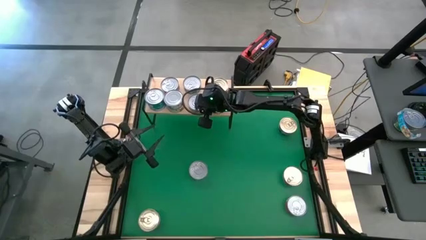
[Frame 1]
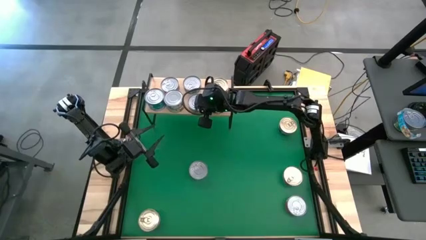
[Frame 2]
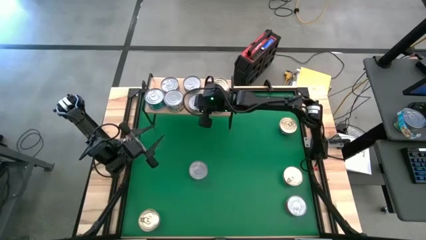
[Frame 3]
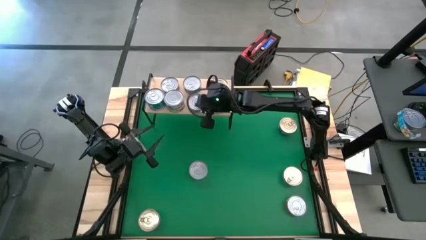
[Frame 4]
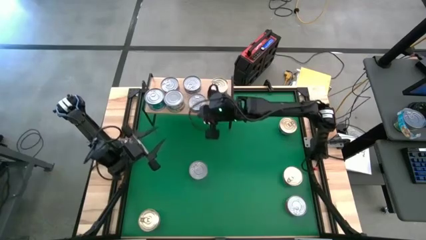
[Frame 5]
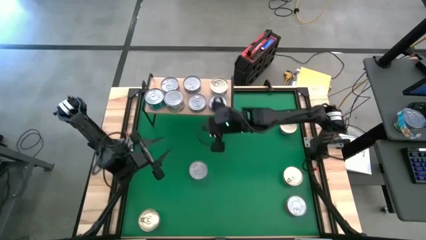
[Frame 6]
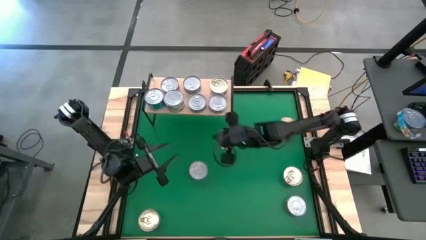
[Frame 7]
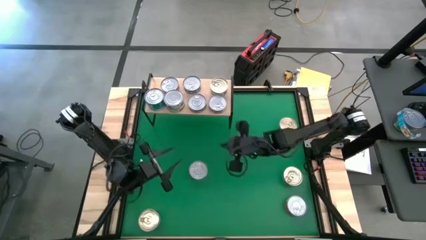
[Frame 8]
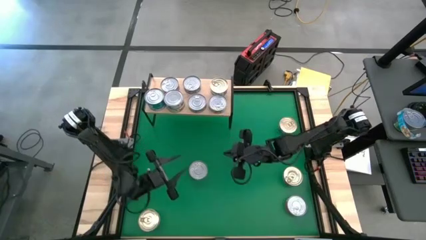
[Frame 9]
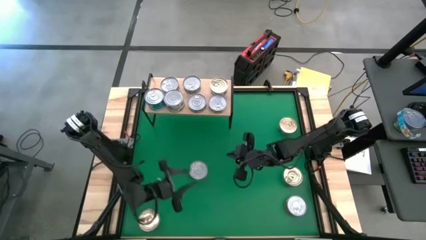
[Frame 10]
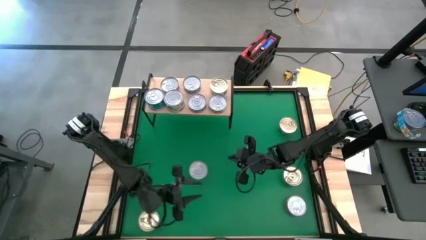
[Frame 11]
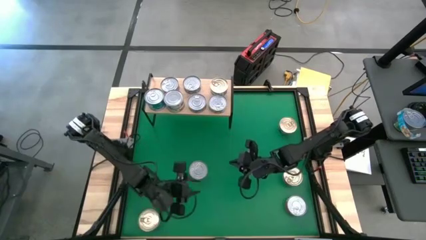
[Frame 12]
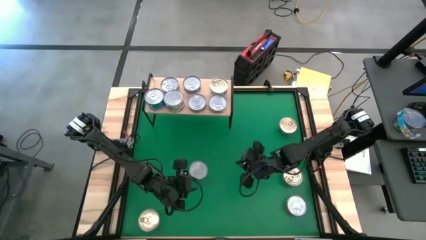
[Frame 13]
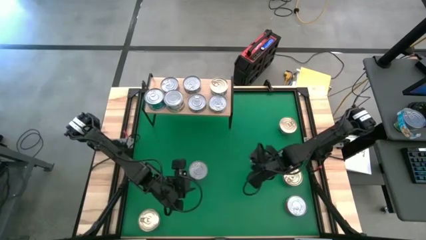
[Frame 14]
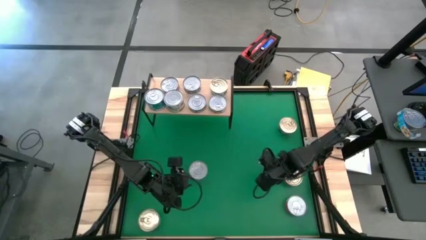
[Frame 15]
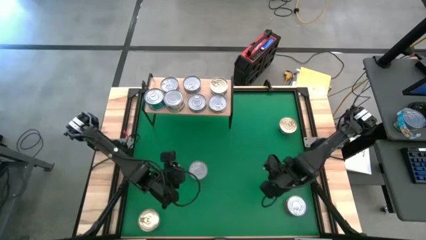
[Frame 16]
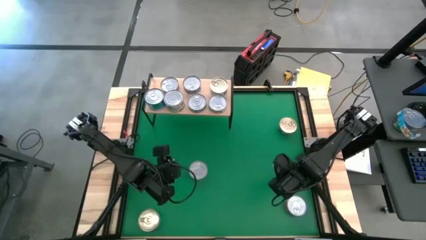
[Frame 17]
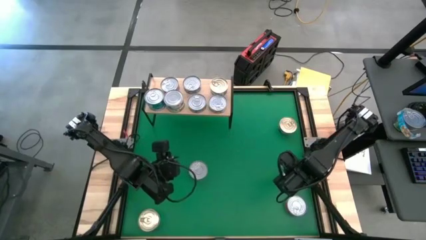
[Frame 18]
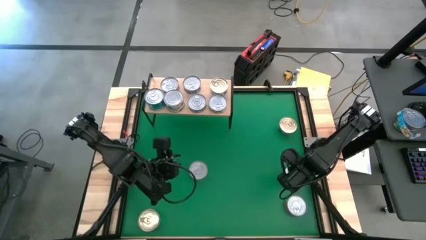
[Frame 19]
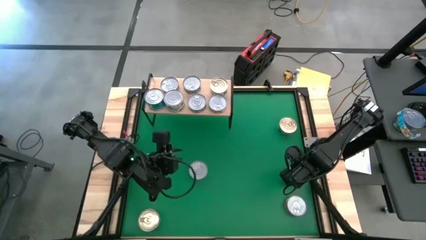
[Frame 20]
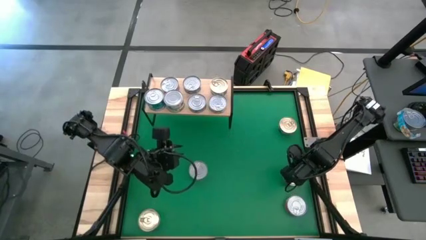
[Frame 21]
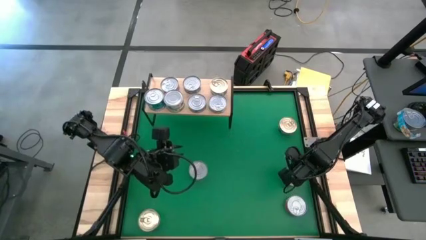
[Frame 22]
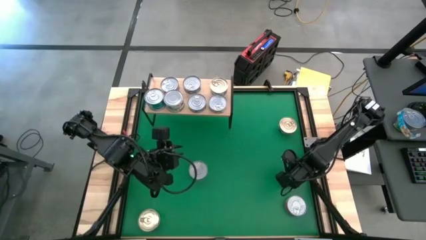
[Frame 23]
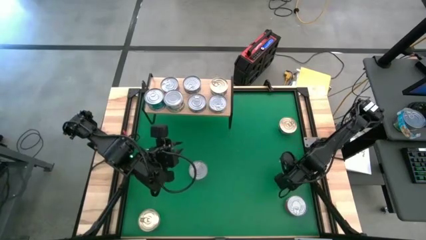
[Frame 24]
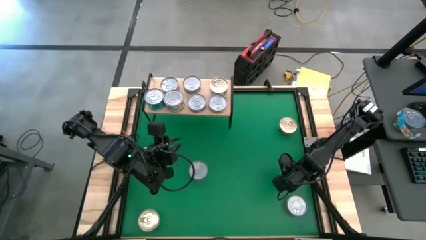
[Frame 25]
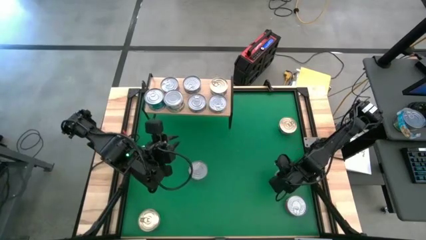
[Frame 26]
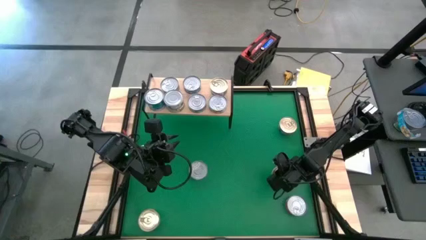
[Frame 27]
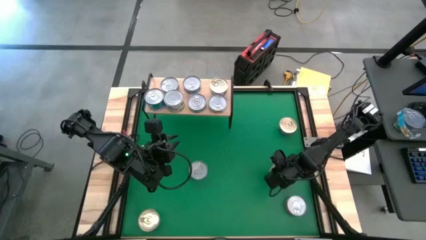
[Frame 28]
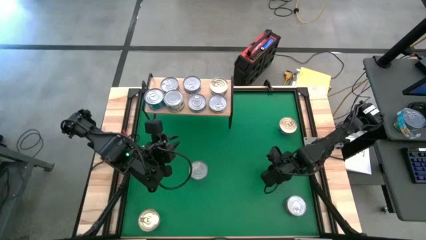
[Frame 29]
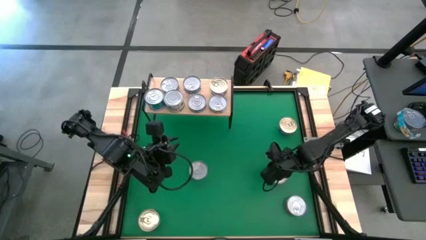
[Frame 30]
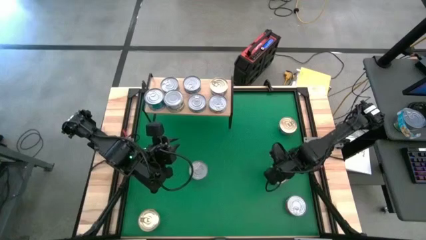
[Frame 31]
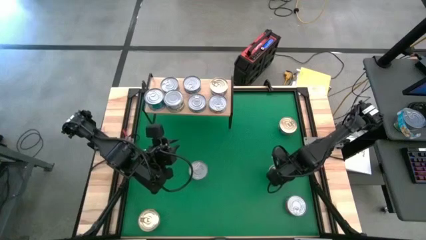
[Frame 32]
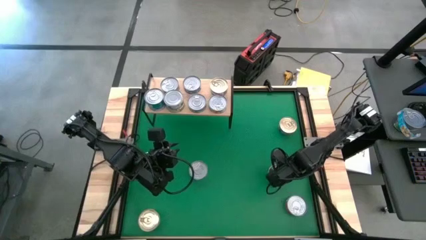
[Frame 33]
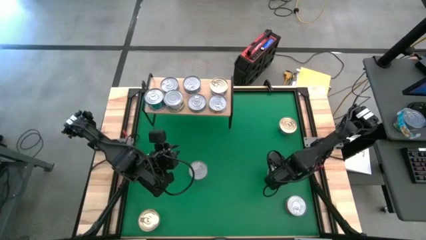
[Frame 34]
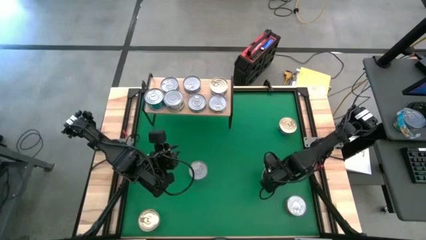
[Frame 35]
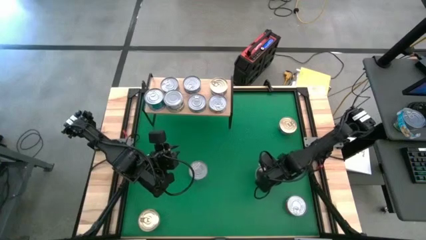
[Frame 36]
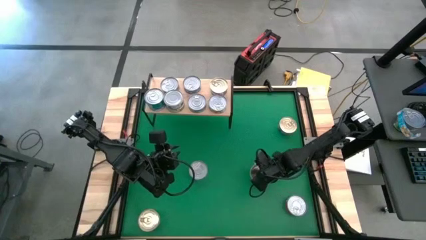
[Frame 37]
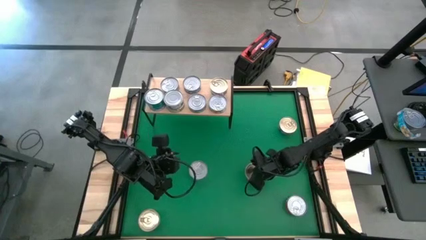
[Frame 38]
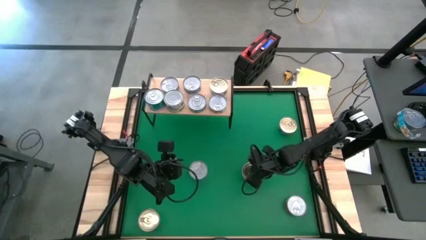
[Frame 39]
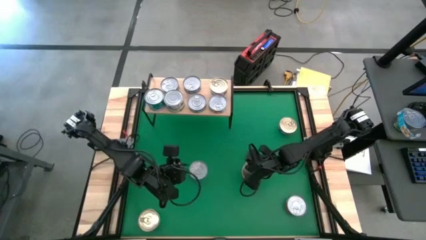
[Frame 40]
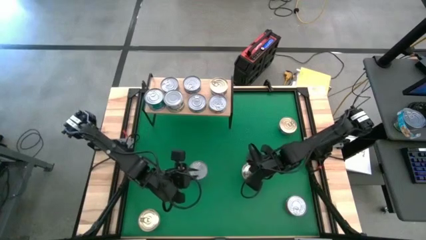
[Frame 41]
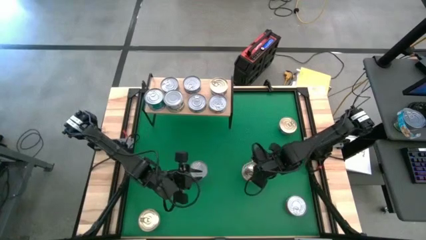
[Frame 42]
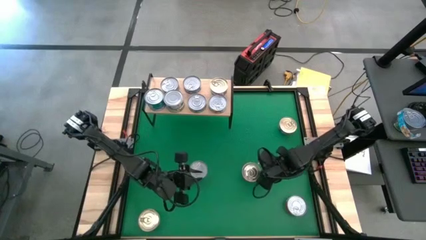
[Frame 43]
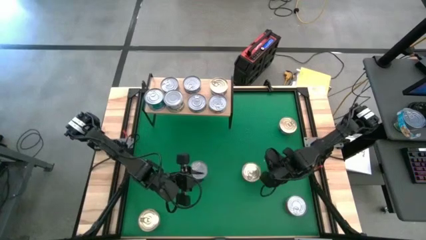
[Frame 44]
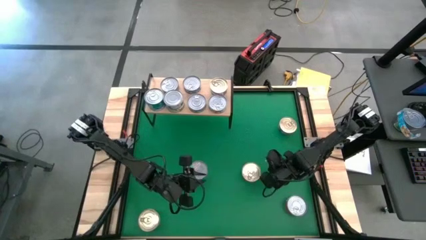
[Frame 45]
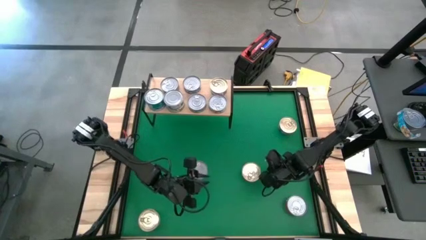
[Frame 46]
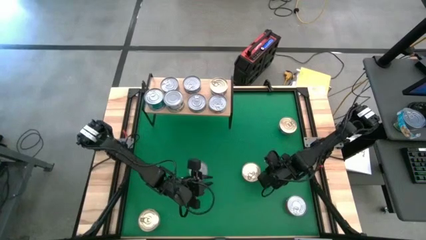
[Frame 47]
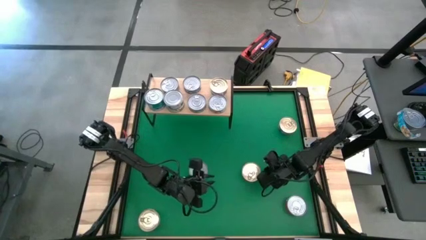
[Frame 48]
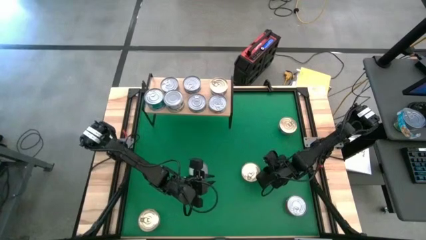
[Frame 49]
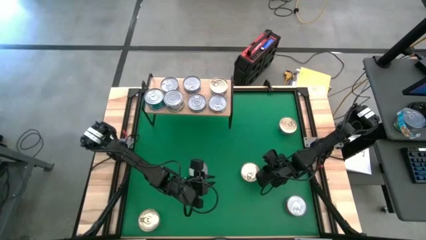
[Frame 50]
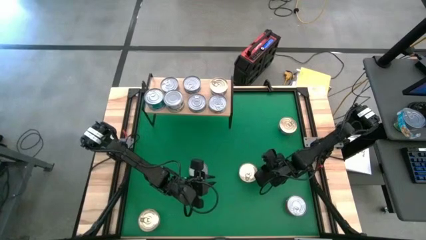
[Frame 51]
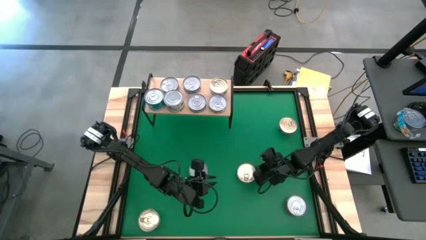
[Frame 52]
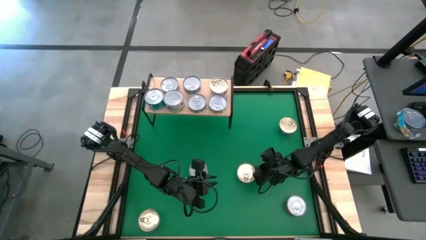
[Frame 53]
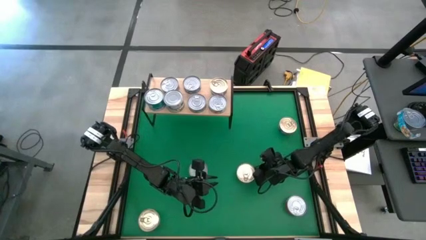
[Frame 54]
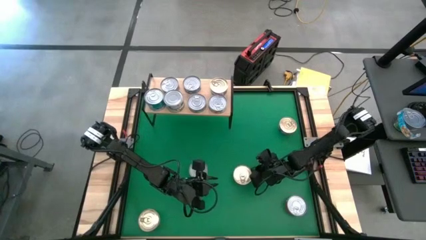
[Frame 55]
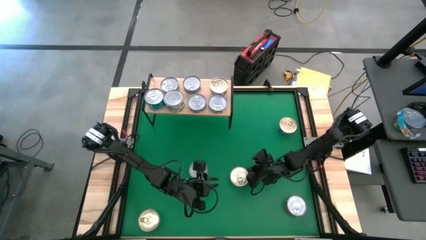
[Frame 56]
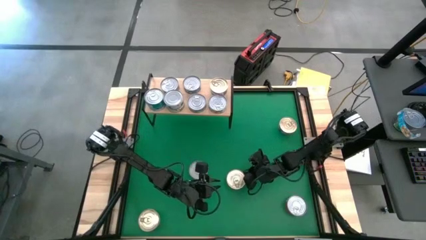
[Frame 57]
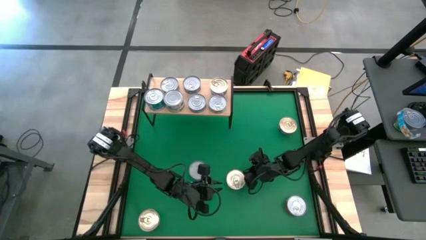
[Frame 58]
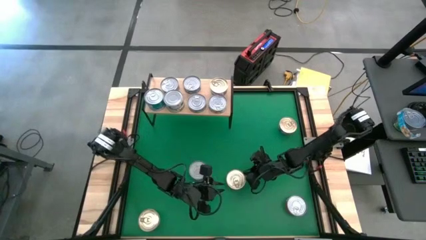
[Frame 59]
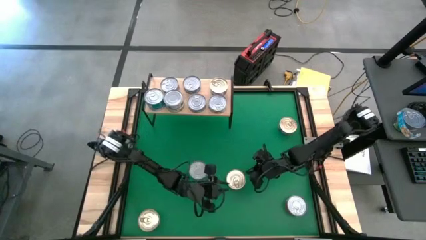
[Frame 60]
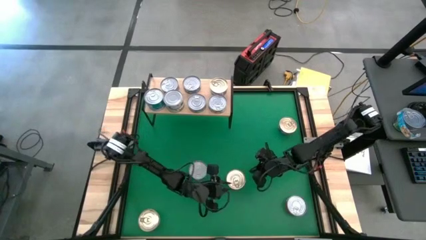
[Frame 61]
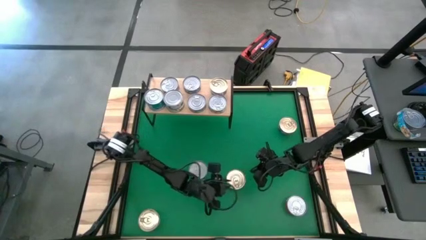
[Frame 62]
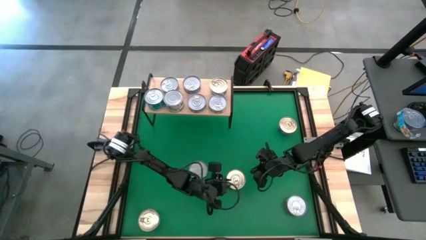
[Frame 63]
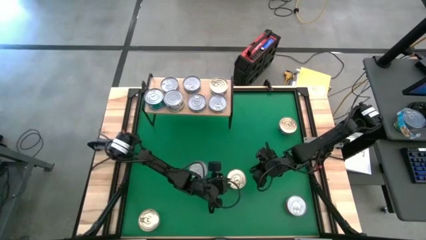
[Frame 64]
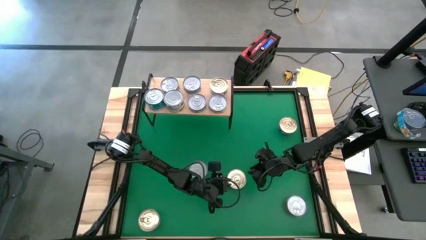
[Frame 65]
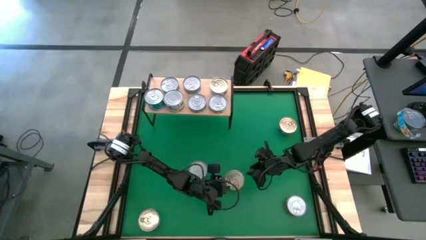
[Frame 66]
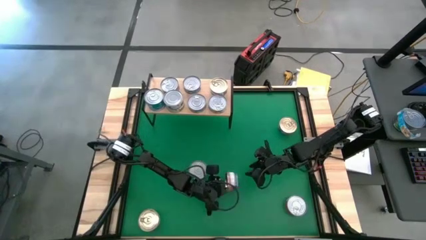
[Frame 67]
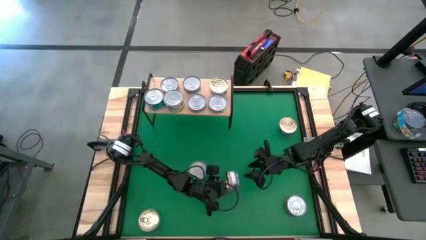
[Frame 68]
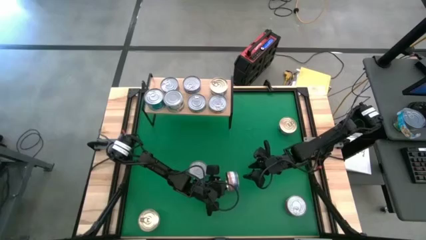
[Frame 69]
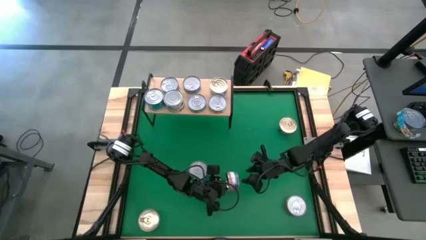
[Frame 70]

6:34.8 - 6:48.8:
Task: Stack canned seafood by type on shelf
Stack the middle right blue tuna can on top of the blue tuna can on the shelf
